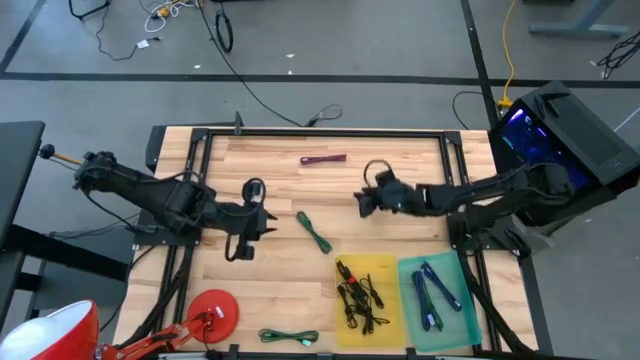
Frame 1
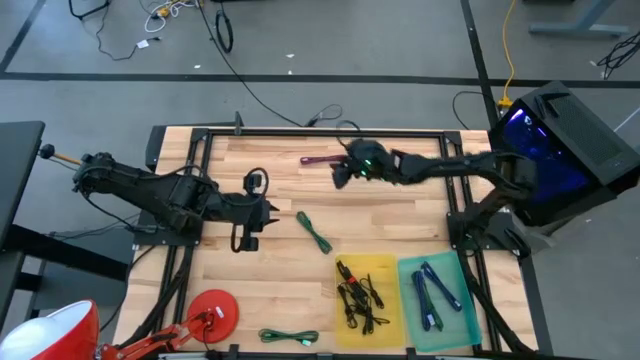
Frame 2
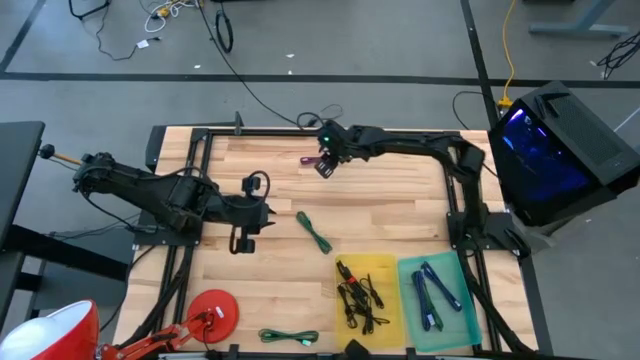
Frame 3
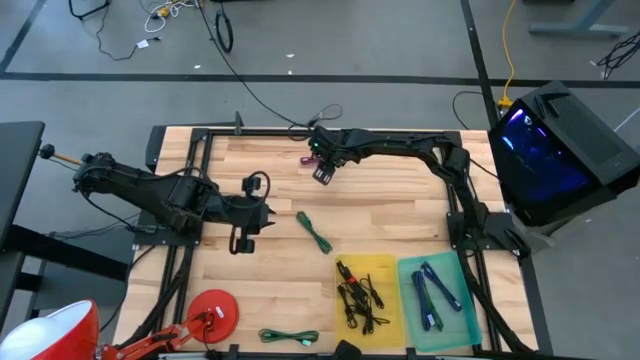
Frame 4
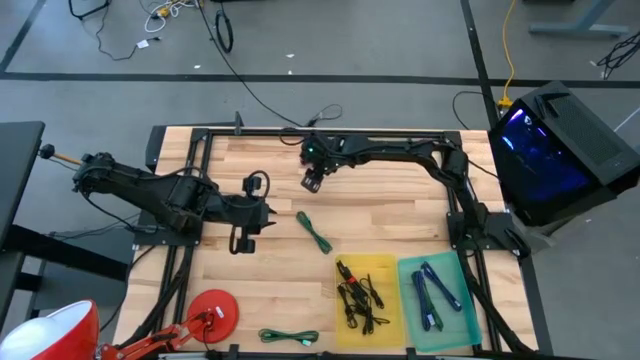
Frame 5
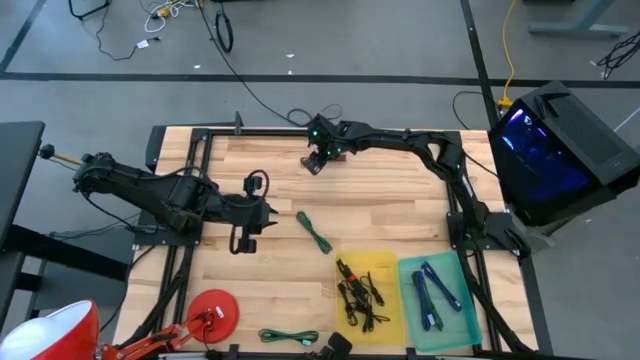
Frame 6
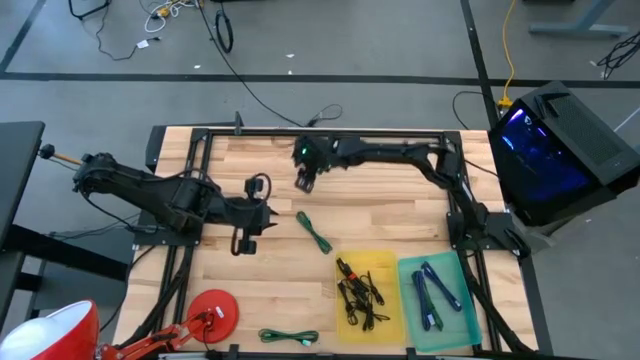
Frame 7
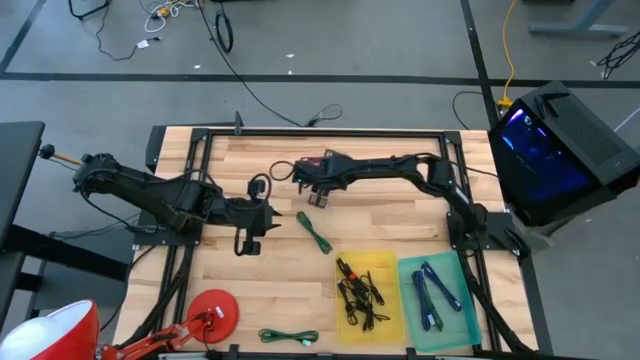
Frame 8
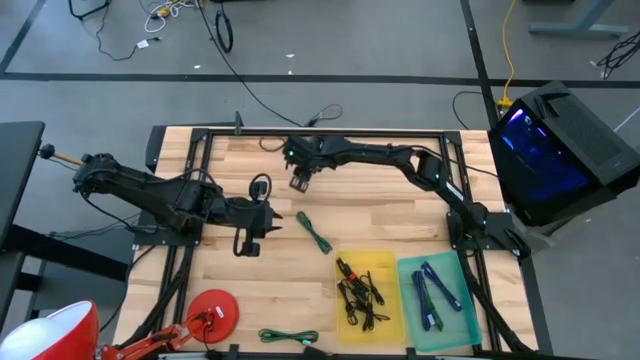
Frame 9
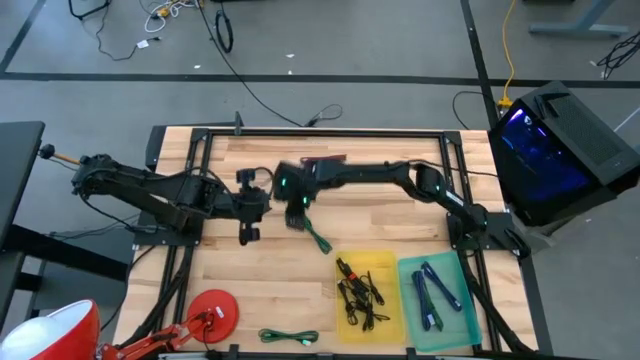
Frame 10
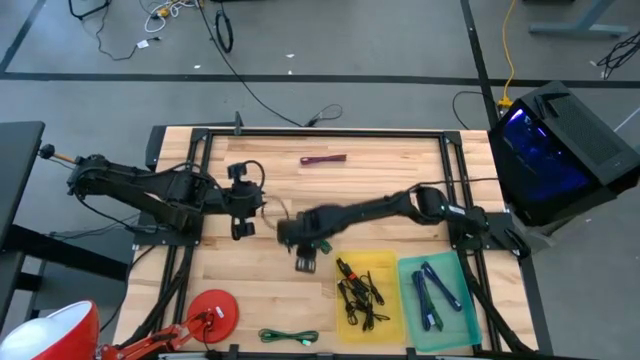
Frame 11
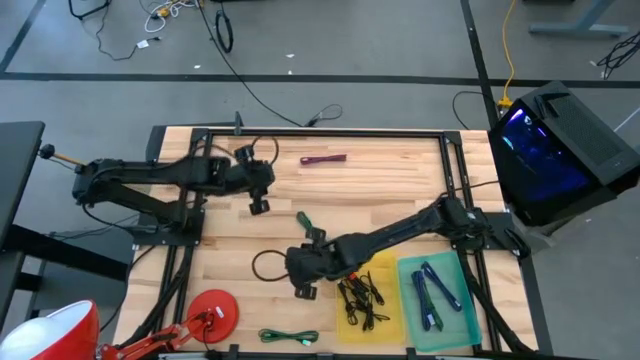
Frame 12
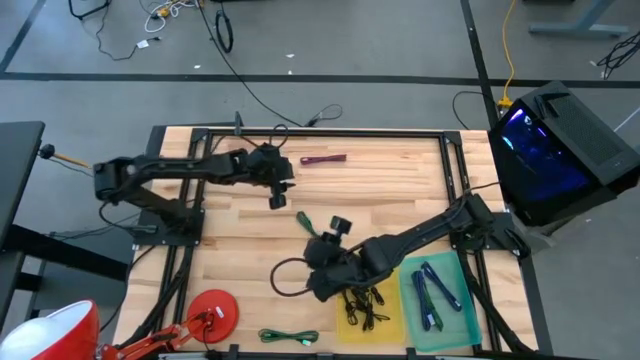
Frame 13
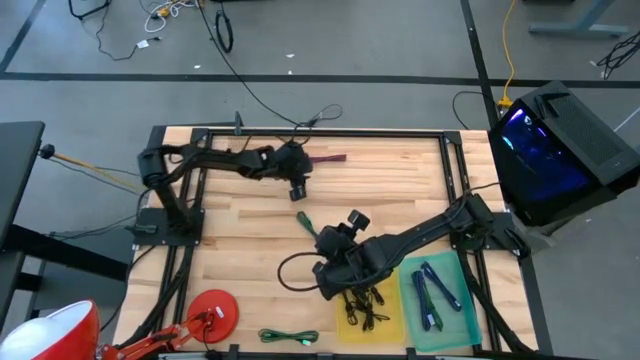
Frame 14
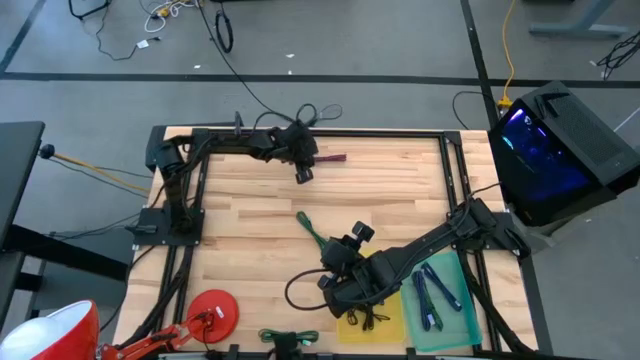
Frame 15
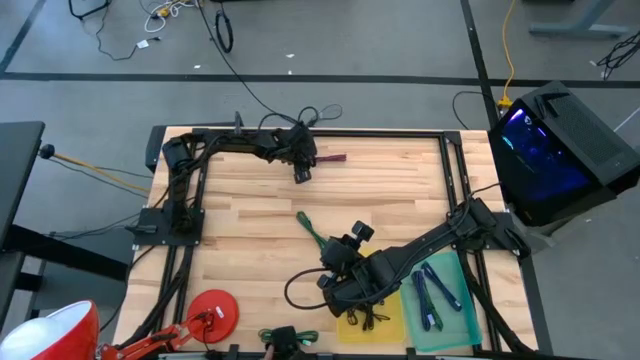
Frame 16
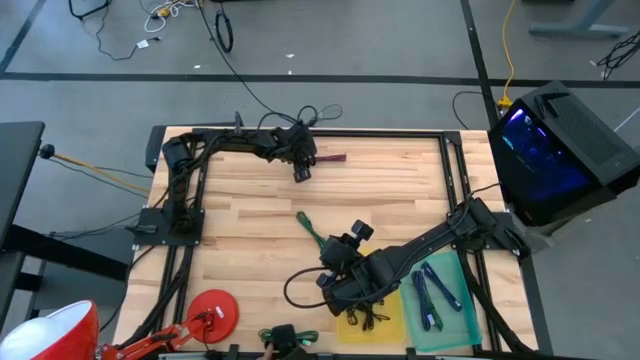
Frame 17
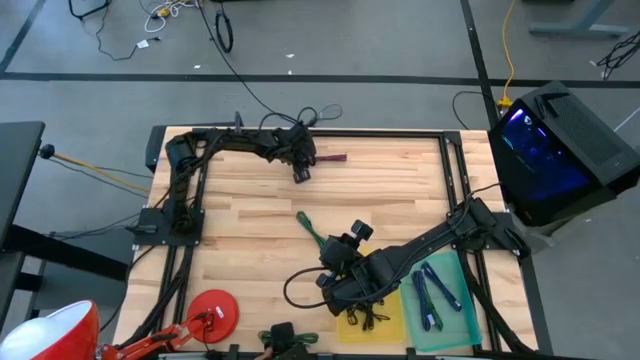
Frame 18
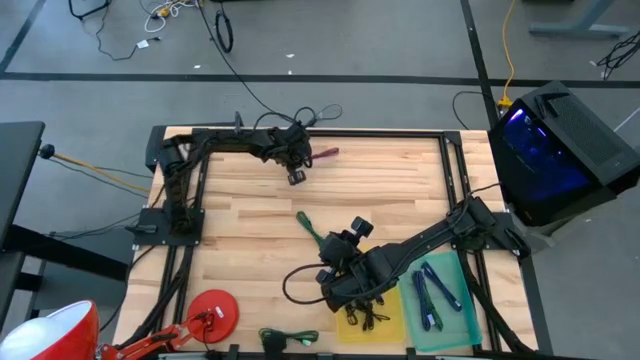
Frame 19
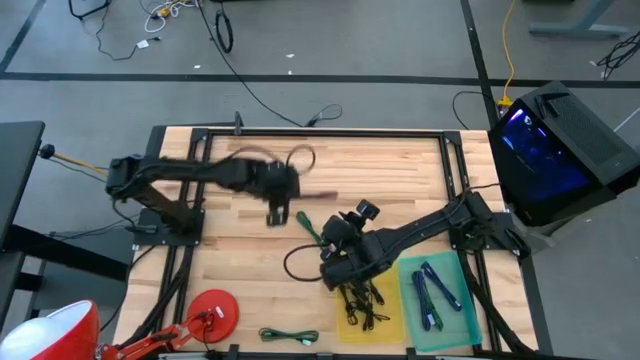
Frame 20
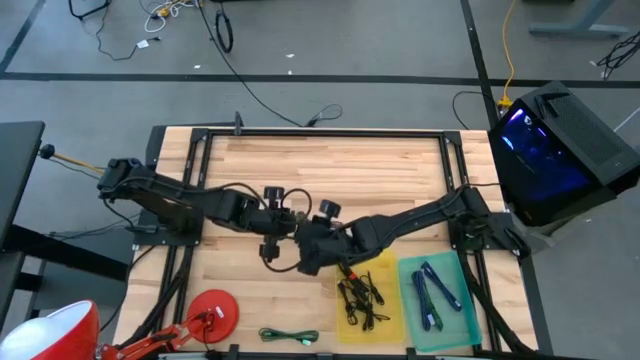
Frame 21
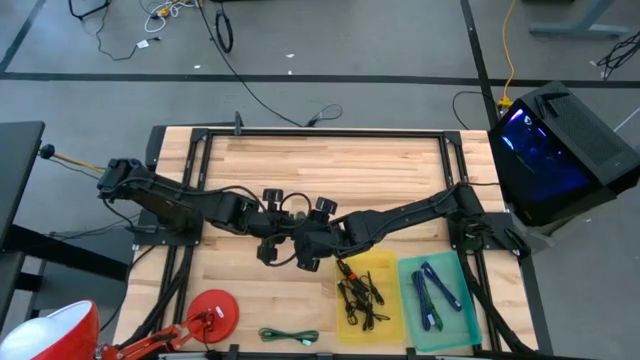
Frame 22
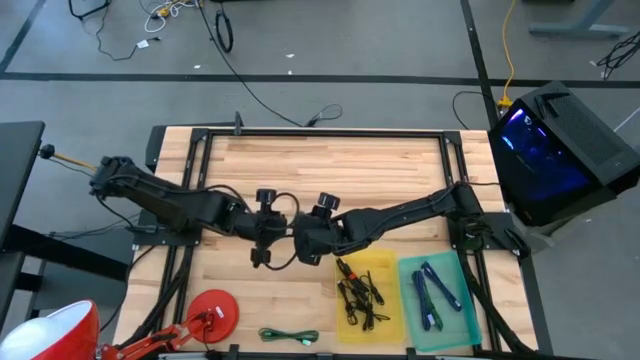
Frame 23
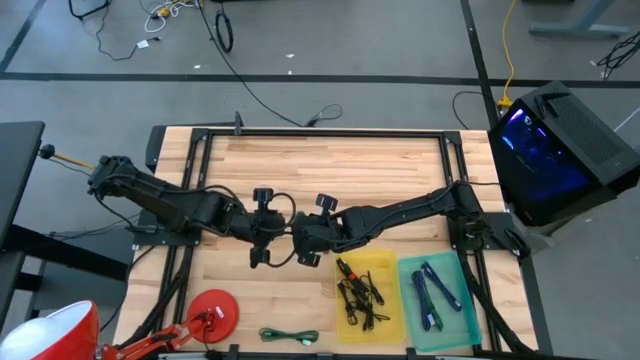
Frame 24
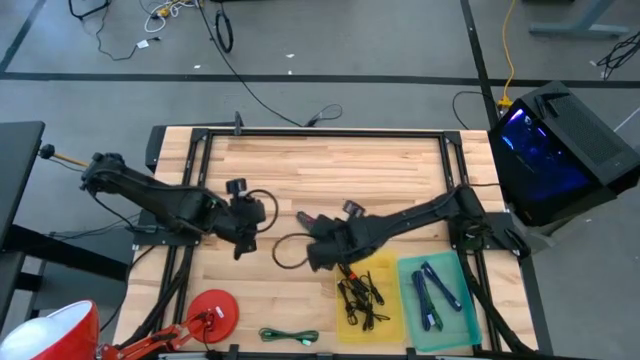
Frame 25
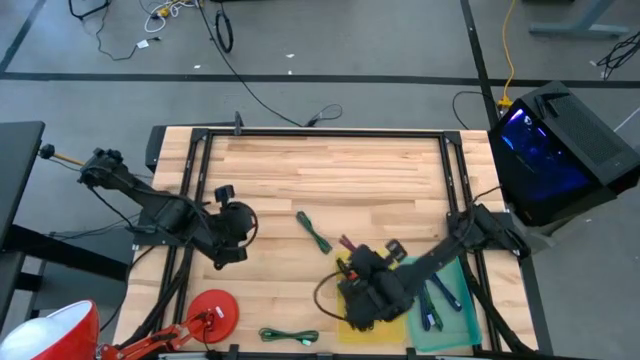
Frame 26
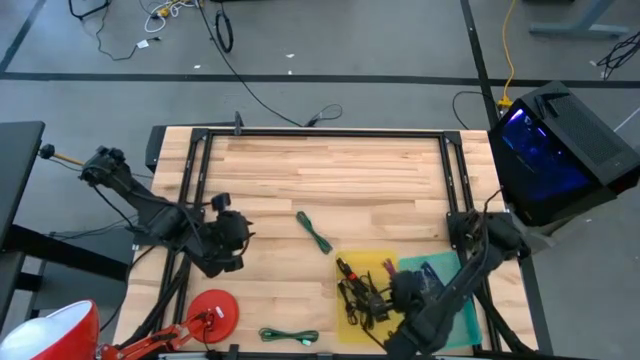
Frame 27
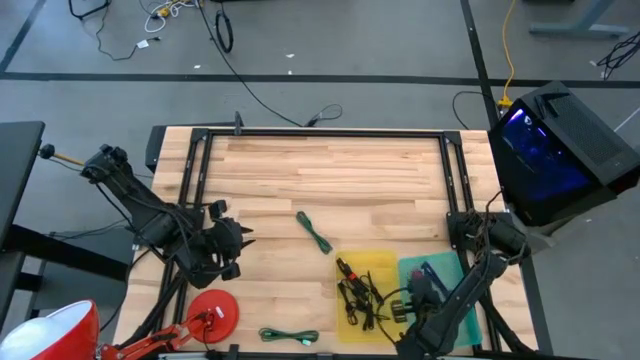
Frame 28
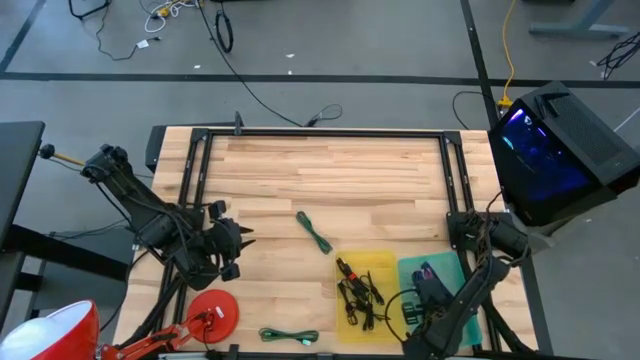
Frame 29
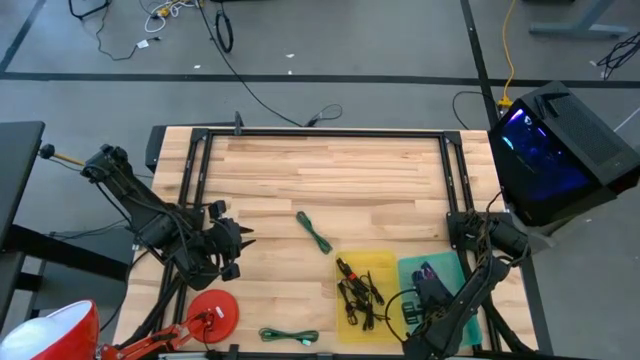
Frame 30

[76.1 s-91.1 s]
Task: Pick & Place USB Port
Put the red pattern charger cable into the blue bin

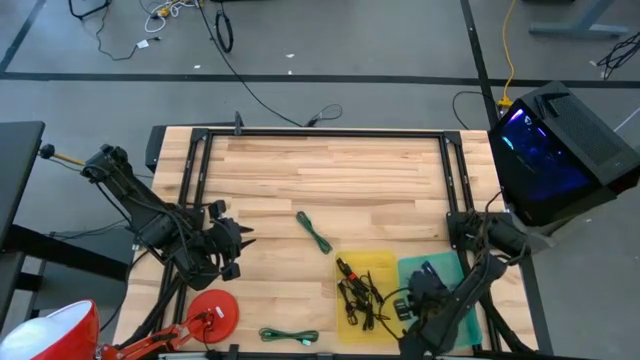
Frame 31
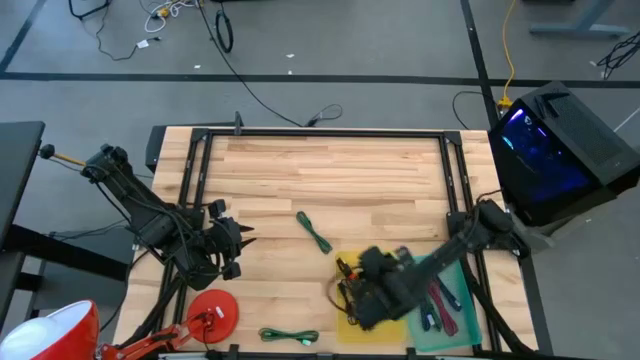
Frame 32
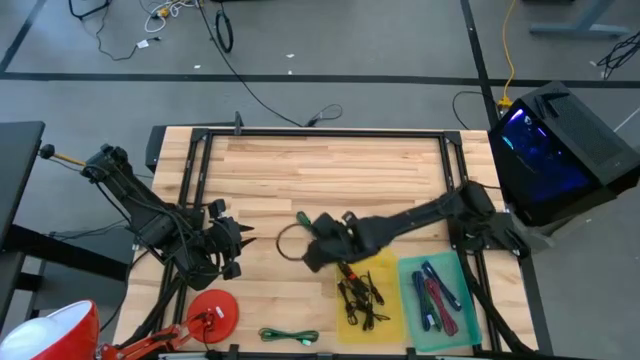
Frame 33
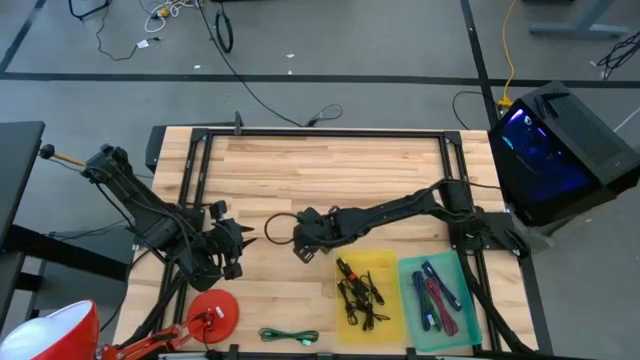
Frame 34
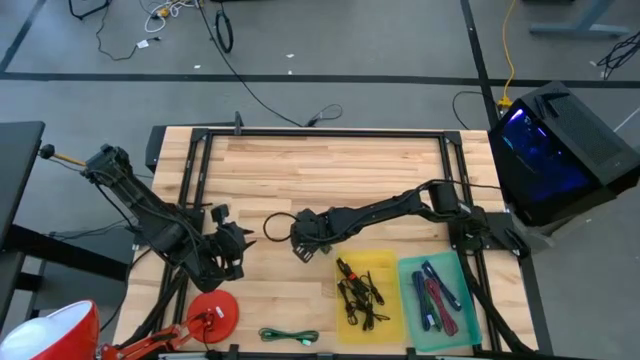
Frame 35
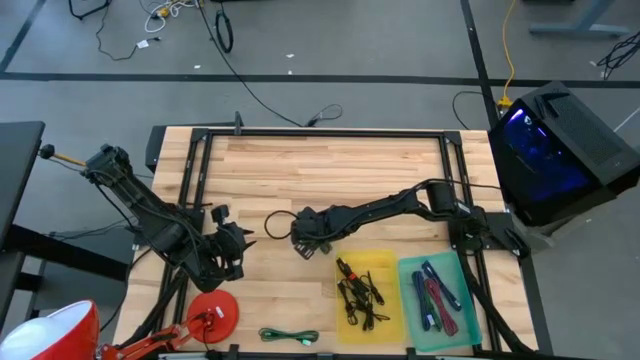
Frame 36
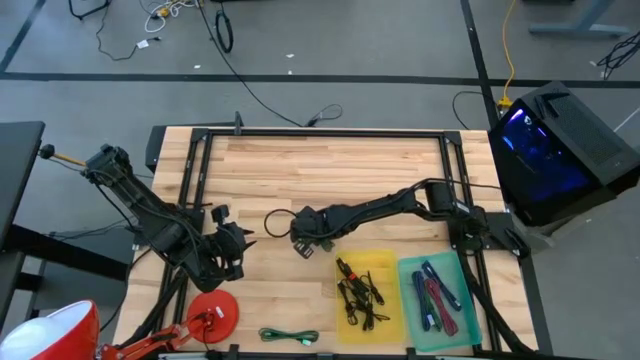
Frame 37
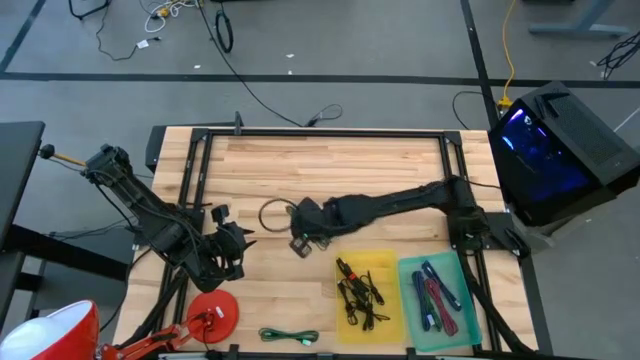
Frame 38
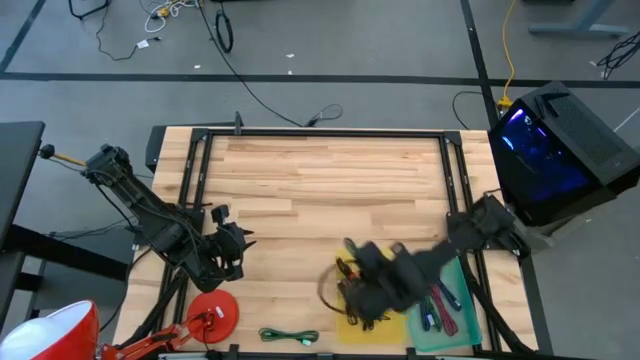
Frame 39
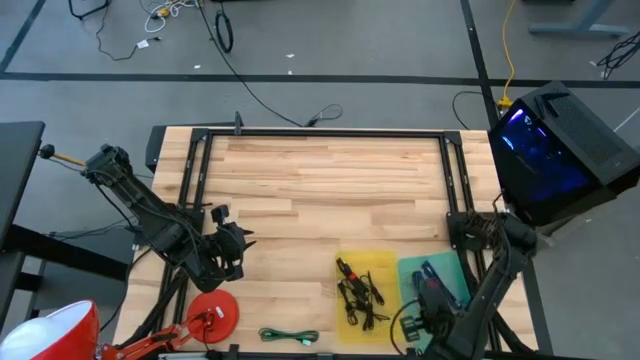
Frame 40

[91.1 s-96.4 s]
Put the top green pattern charger cable into the blue bin

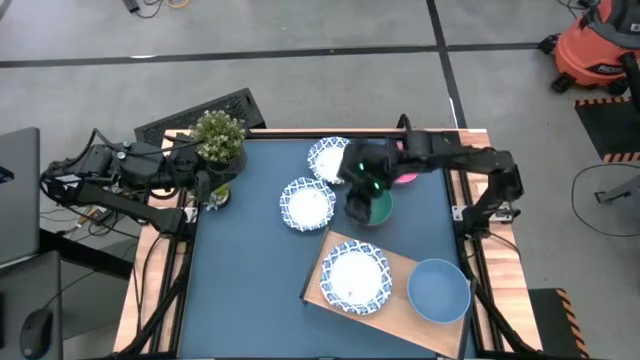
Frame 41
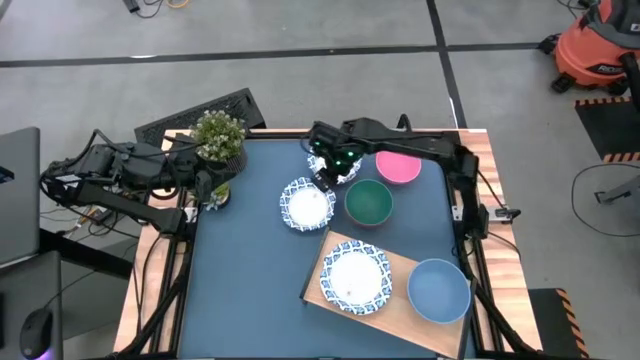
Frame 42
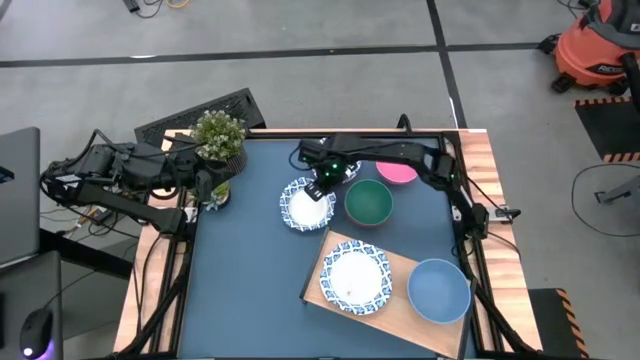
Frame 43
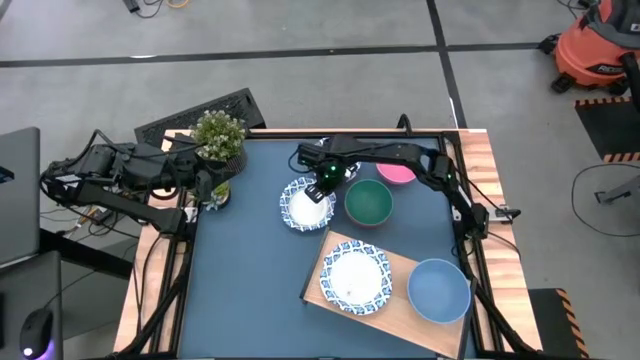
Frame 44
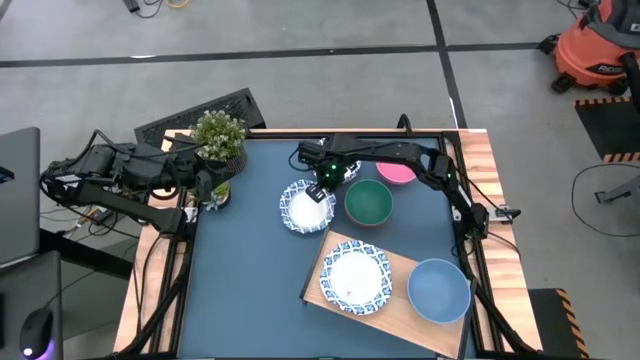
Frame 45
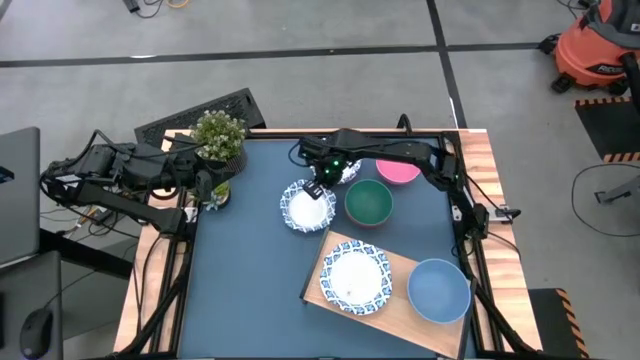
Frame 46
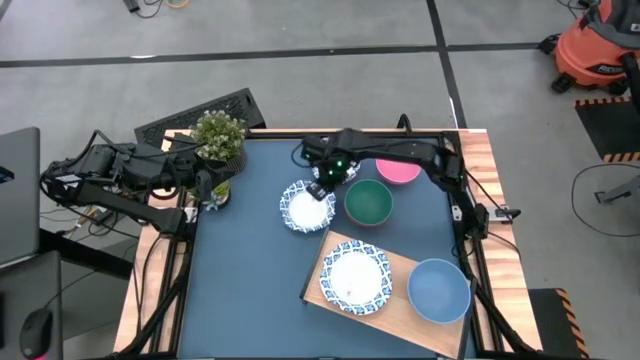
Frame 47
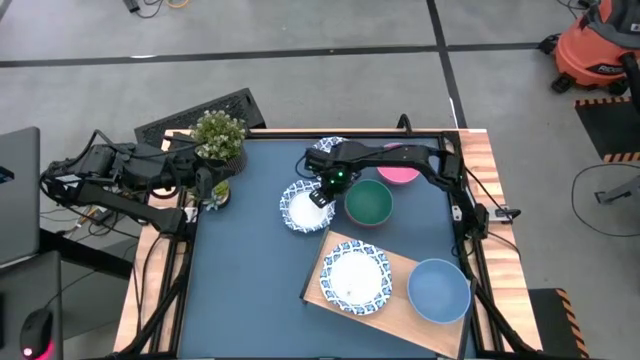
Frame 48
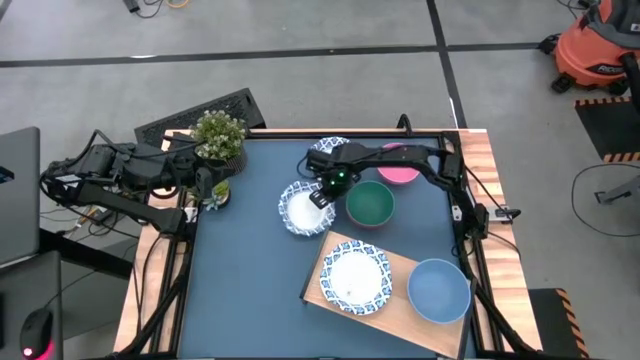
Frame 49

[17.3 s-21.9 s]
Task: Place and stack bowls onto a shelf
Stack the white bowl on top of the white bowl on the shelf
